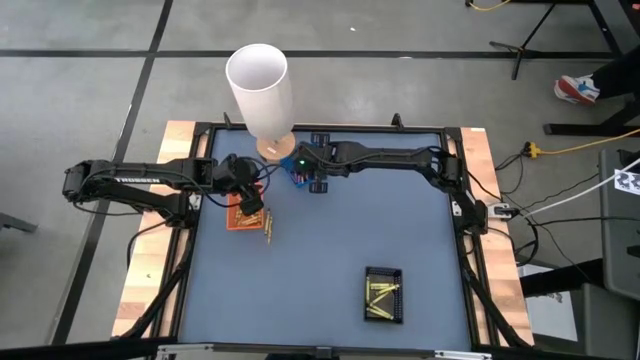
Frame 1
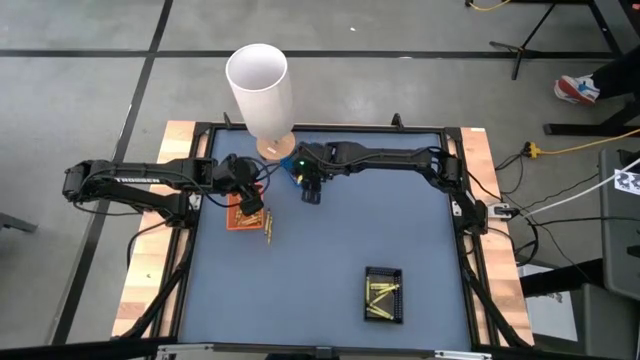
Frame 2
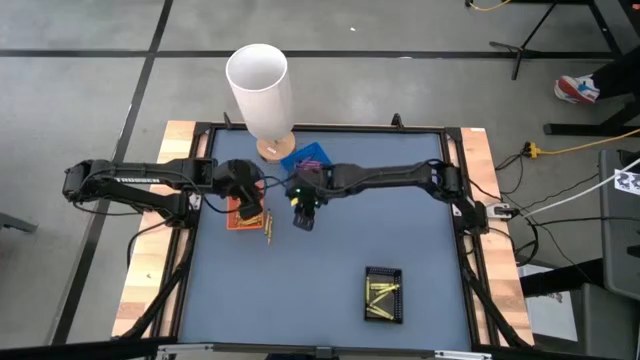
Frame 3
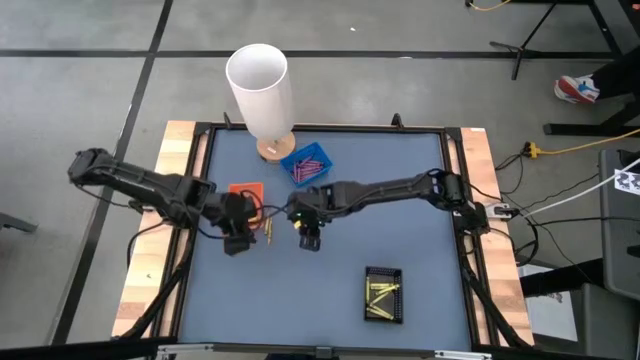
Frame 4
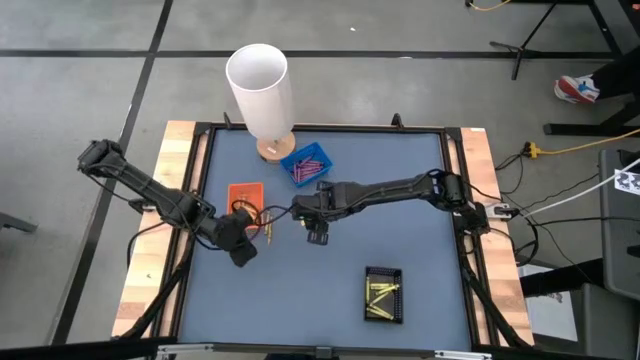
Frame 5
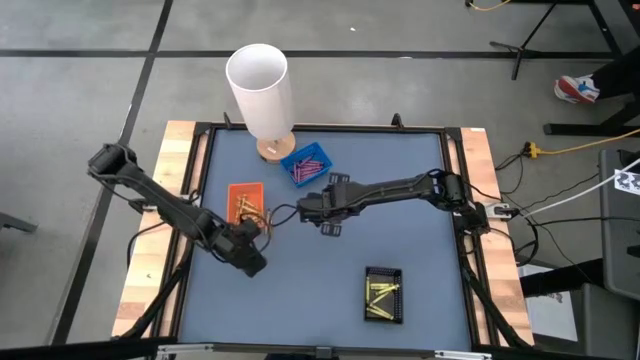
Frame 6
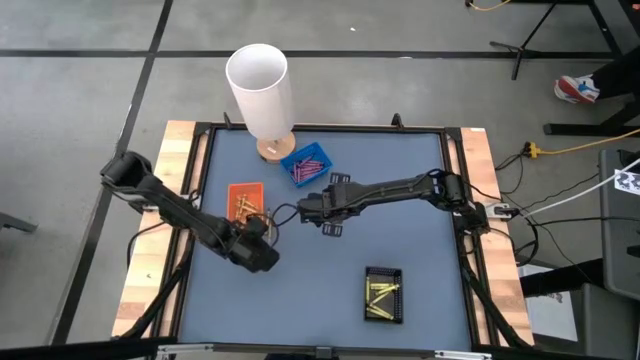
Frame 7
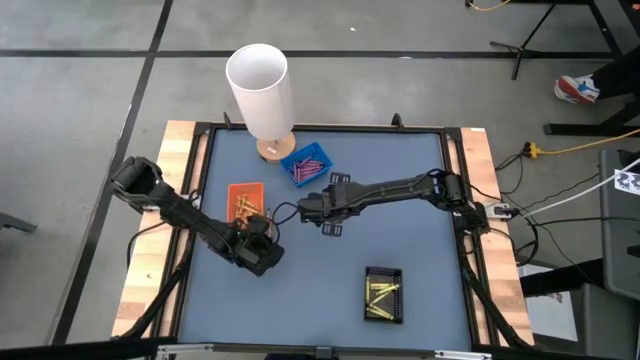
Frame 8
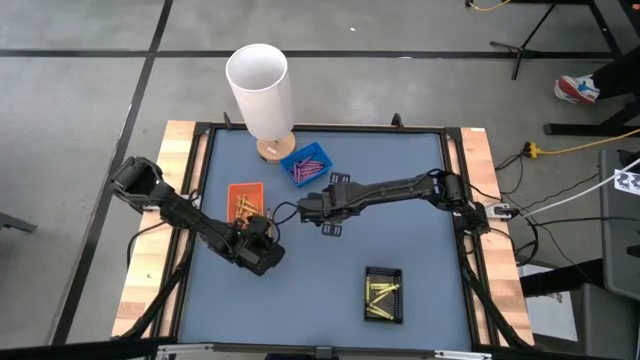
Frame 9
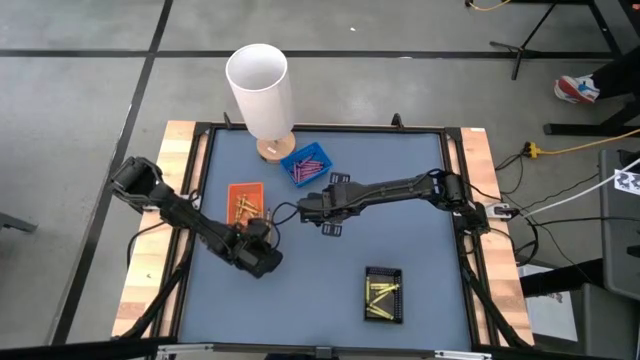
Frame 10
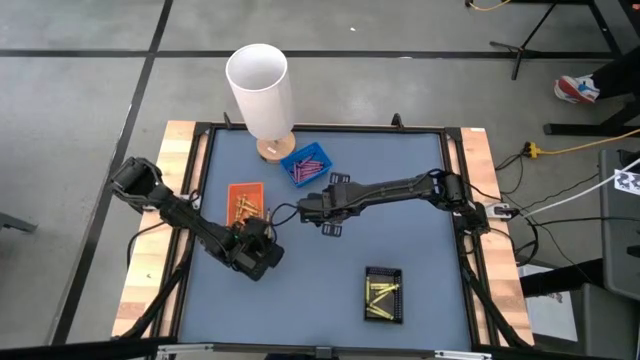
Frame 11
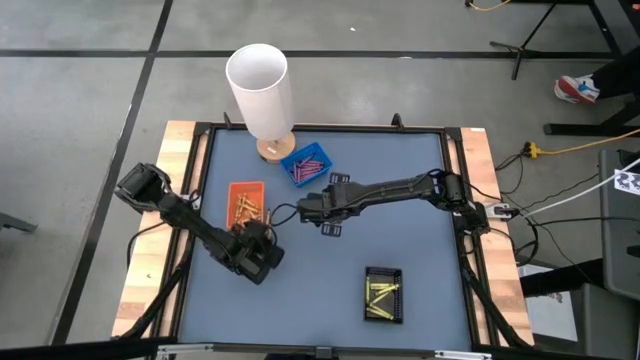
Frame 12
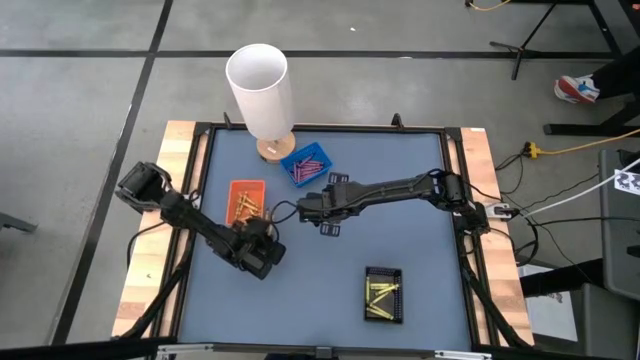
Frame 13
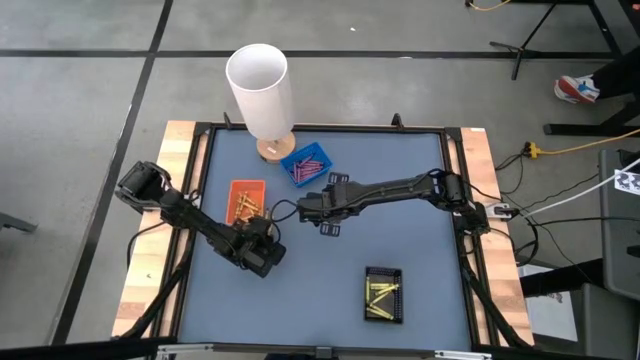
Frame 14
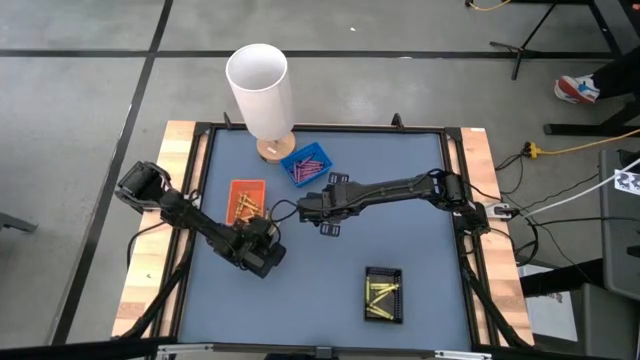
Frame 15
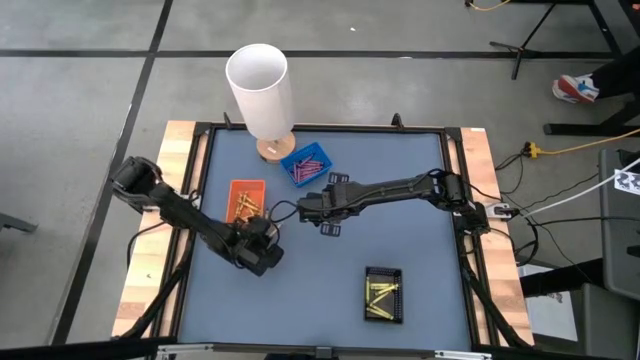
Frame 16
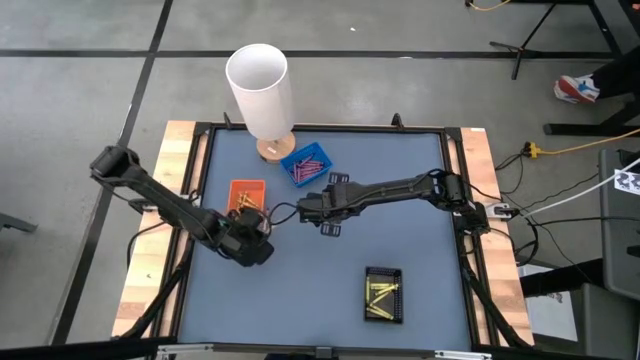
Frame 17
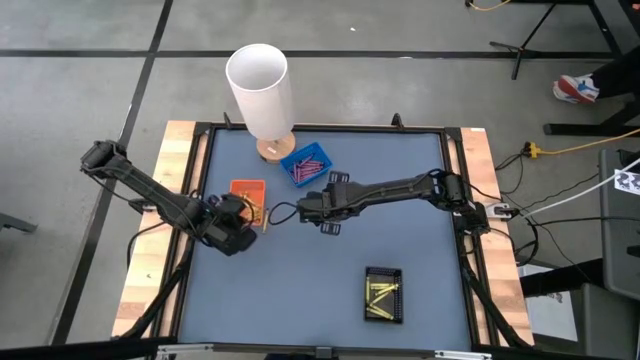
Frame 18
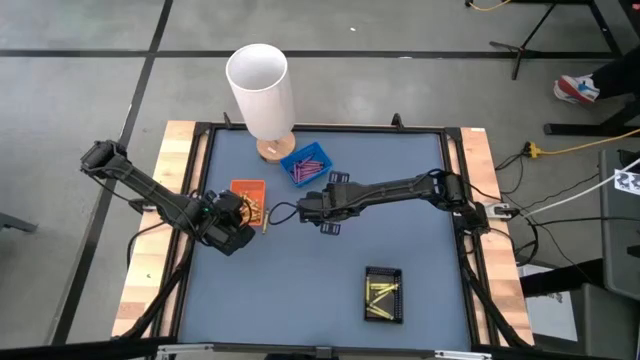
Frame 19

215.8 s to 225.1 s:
Task: Sort crayons
Put the yellow crayon into the orange bin

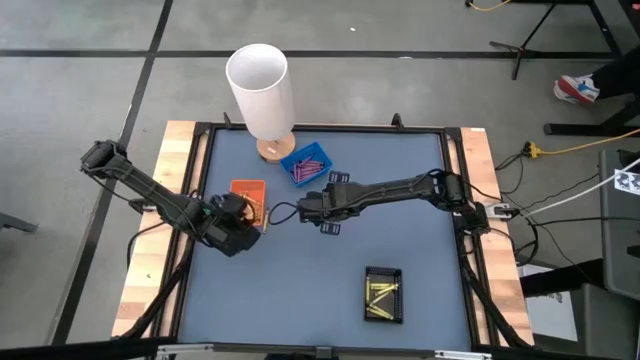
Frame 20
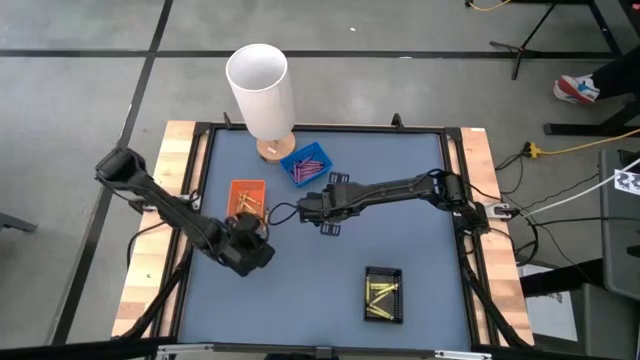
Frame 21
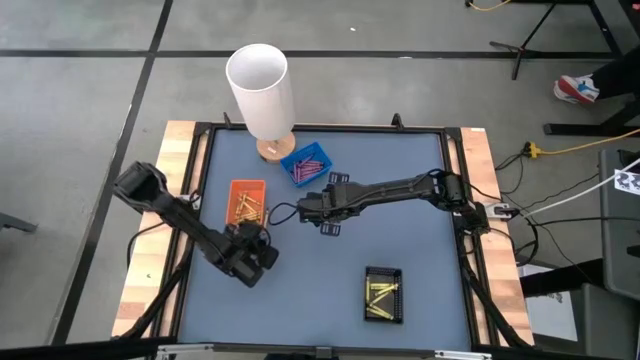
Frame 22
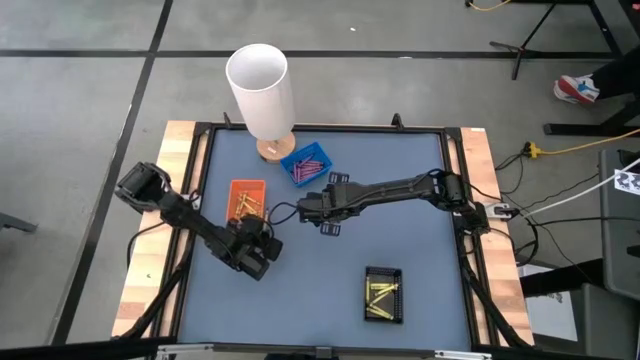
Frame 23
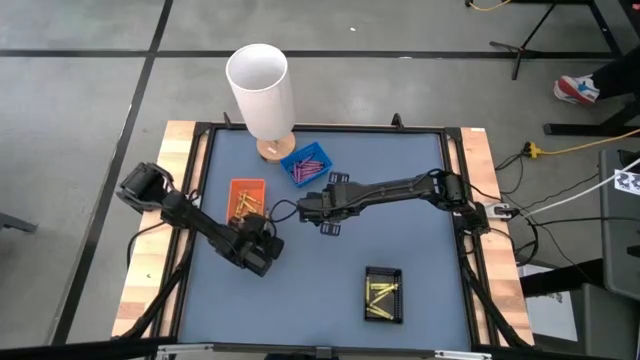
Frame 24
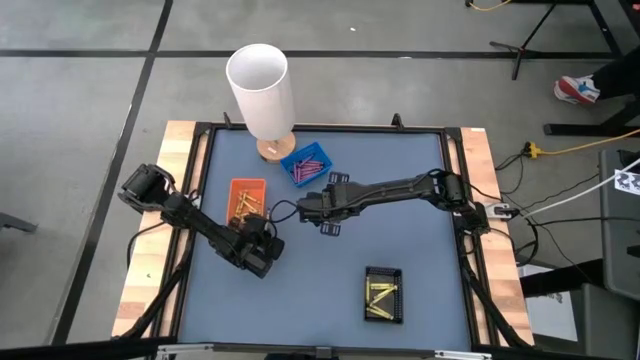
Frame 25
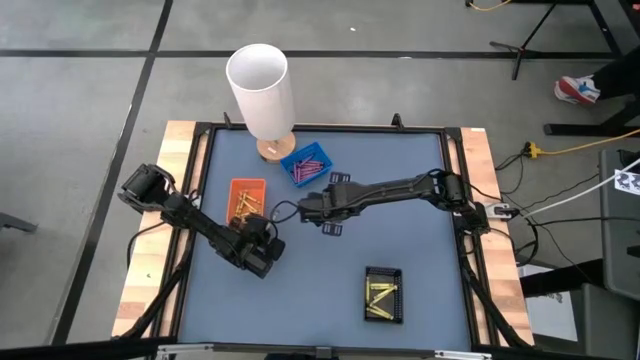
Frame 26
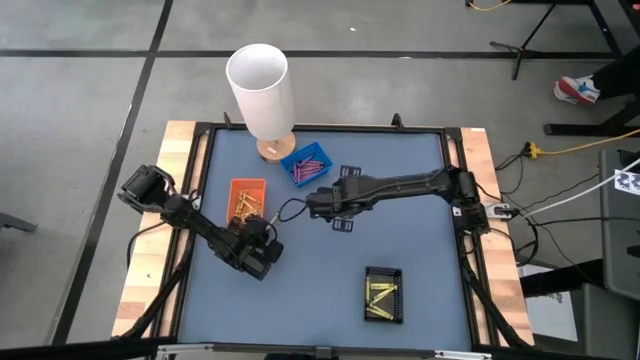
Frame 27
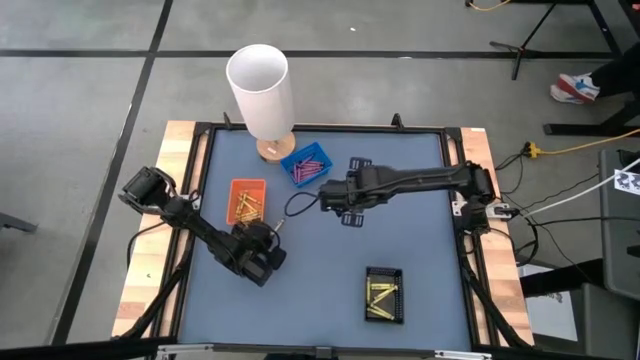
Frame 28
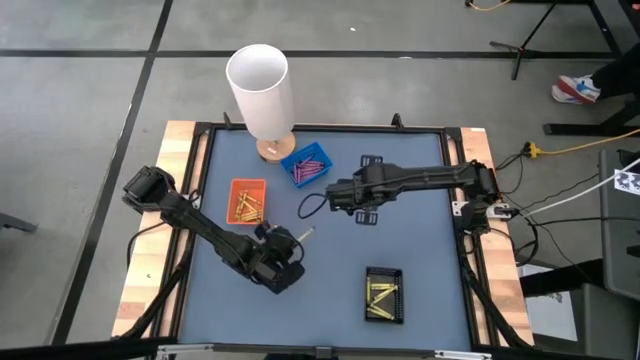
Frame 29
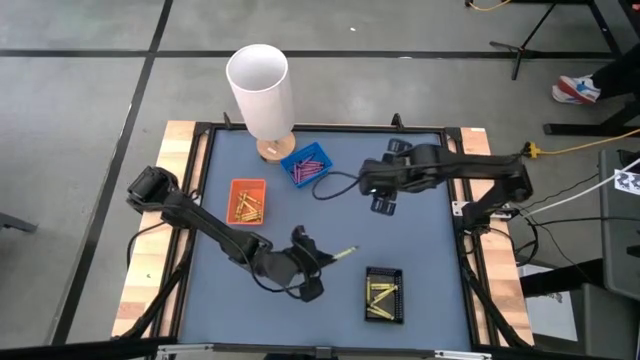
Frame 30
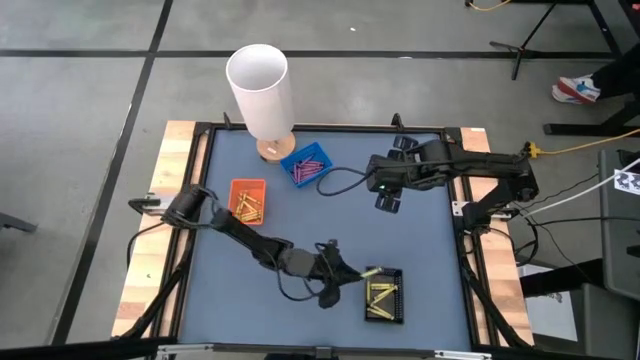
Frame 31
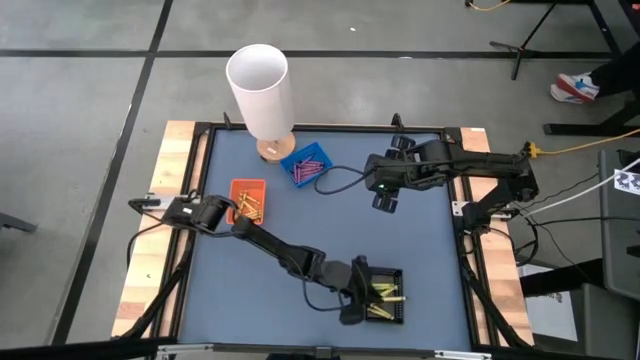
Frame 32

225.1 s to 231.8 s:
Put the green crayon into the black bin

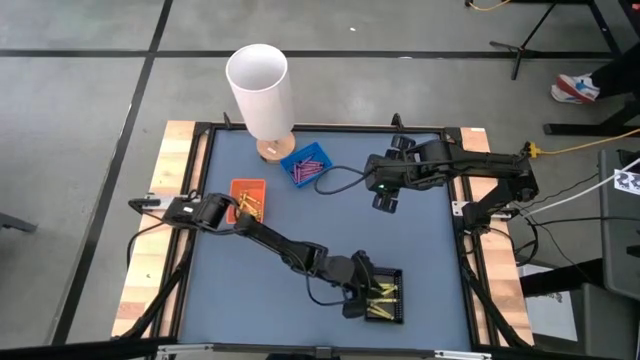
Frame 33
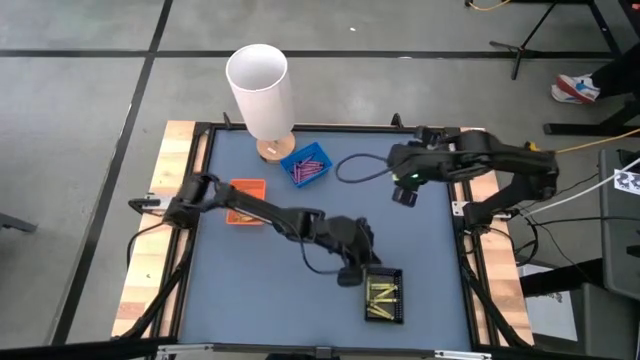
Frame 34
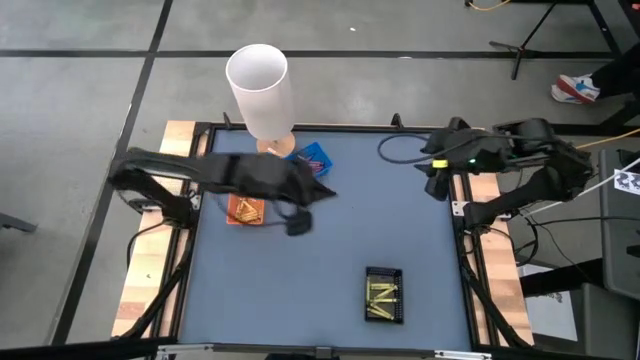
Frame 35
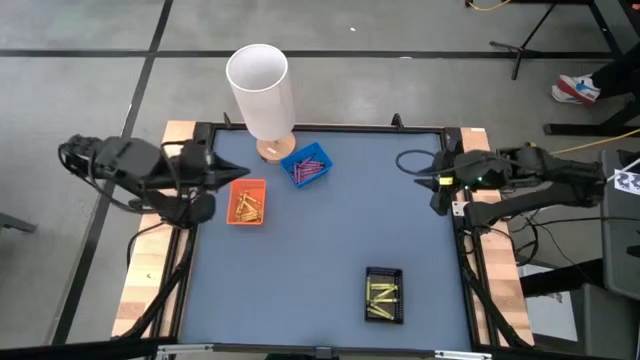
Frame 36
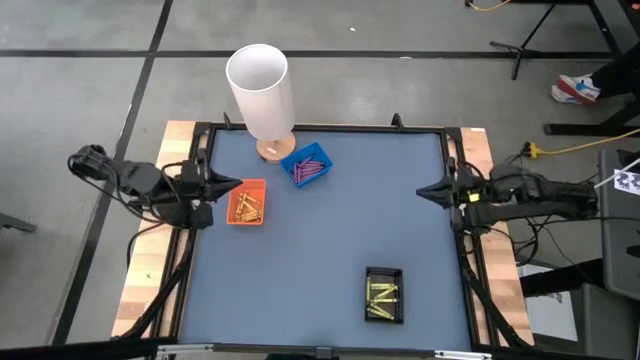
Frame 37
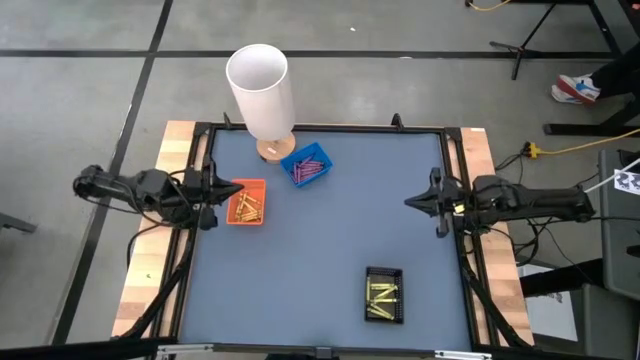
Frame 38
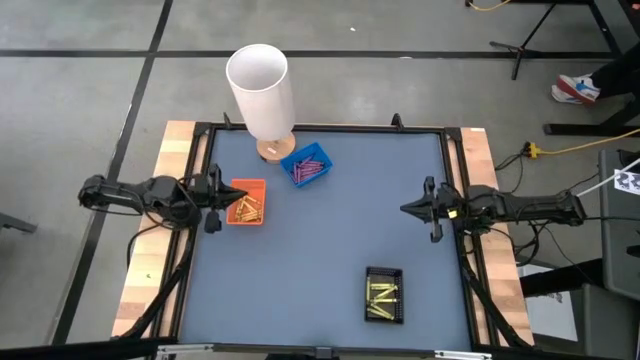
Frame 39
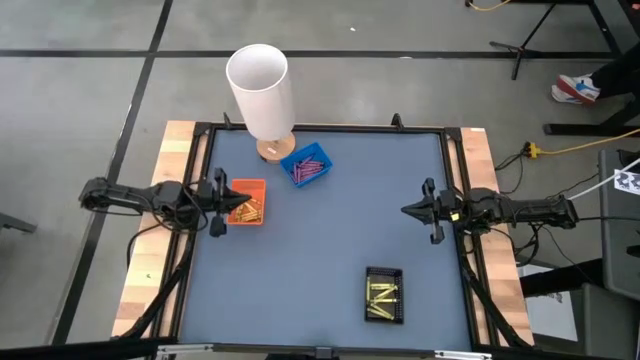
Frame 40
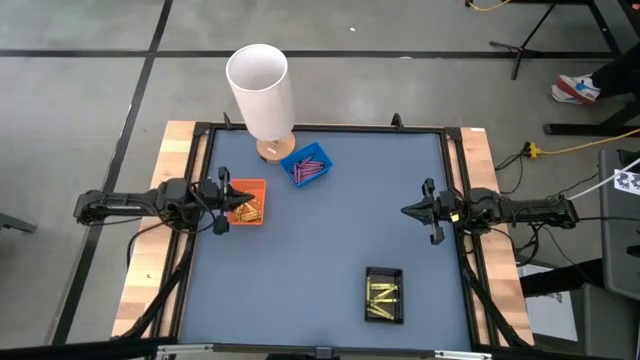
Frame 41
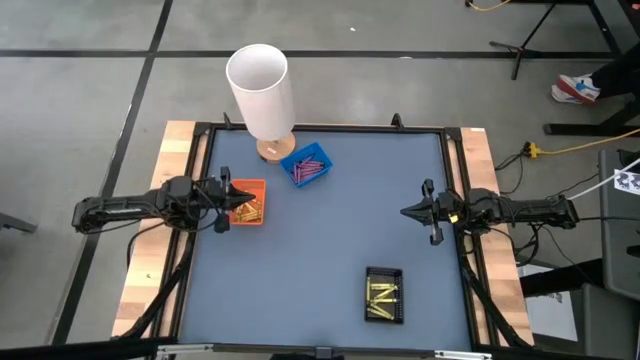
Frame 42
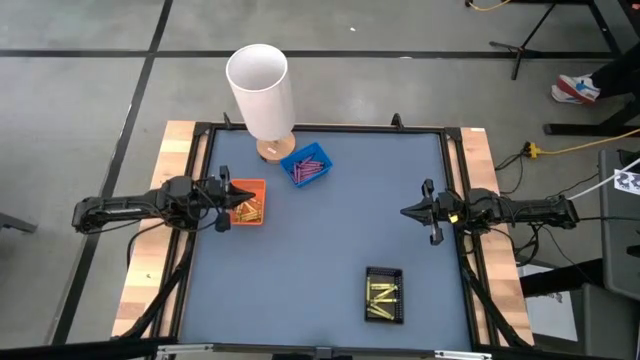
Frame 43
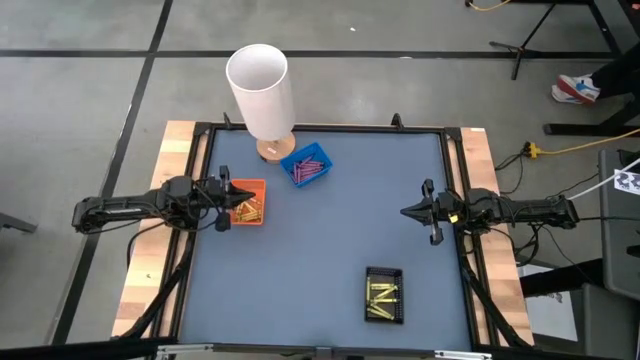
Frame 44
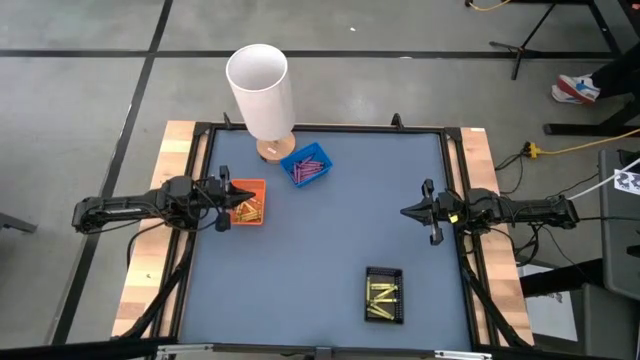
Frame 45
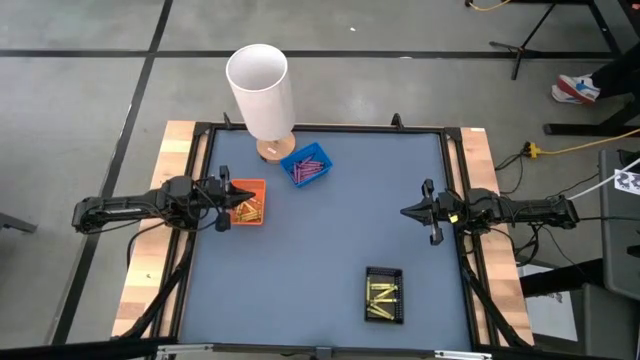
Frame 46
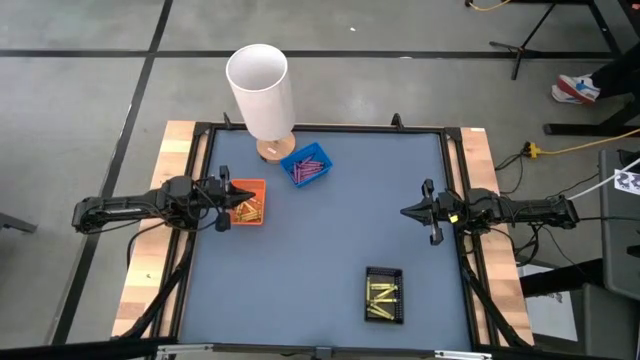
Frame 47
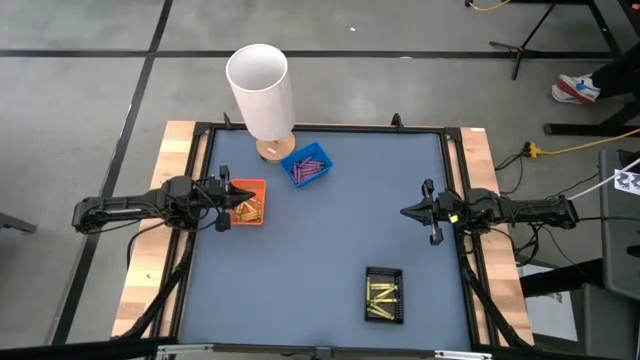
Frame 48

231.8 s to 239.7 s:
Return to Home Position
